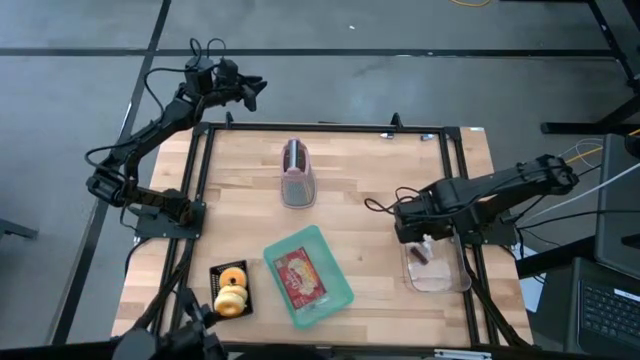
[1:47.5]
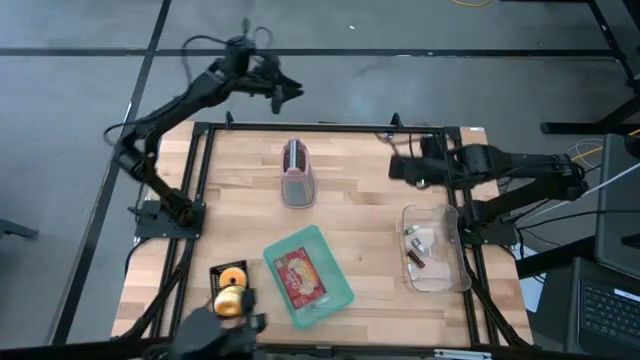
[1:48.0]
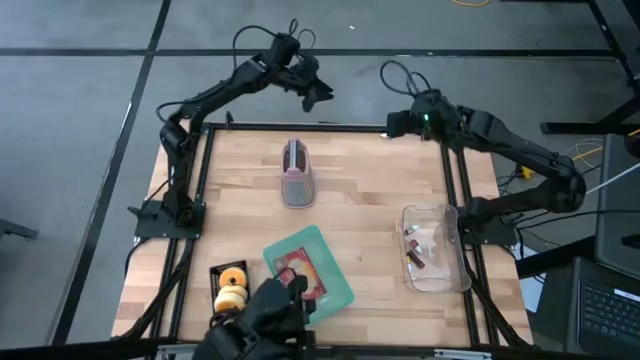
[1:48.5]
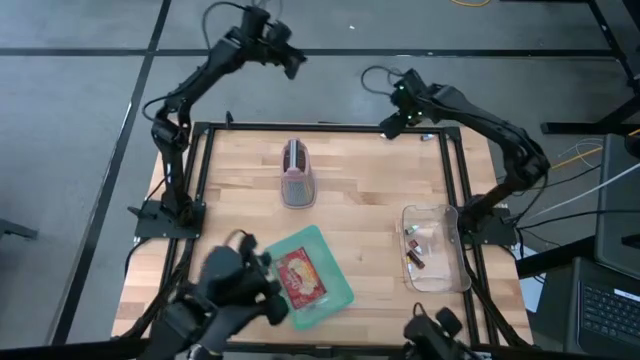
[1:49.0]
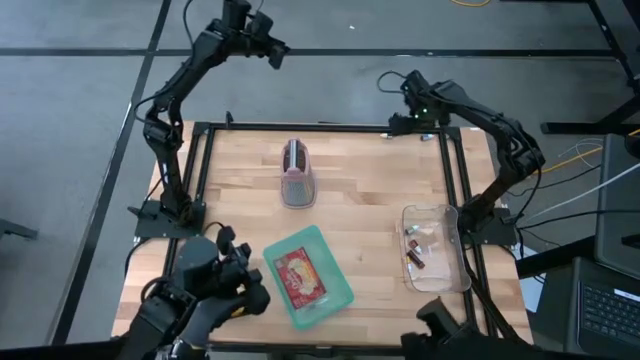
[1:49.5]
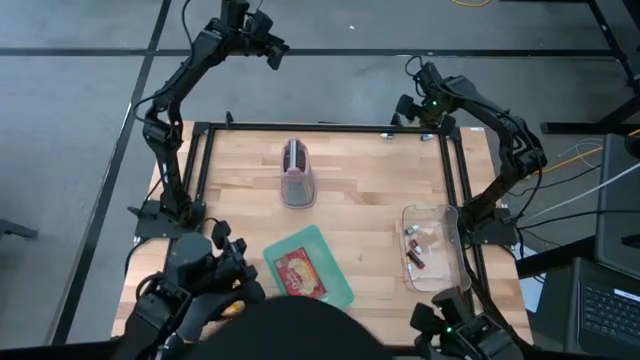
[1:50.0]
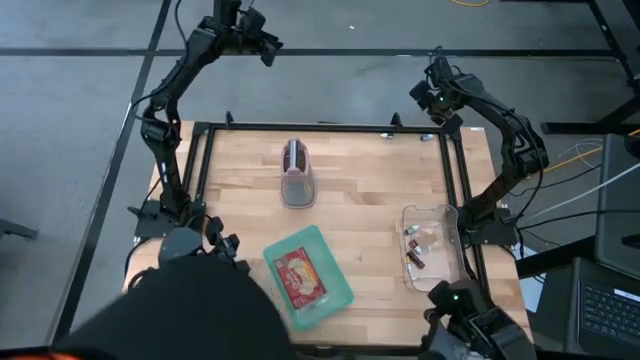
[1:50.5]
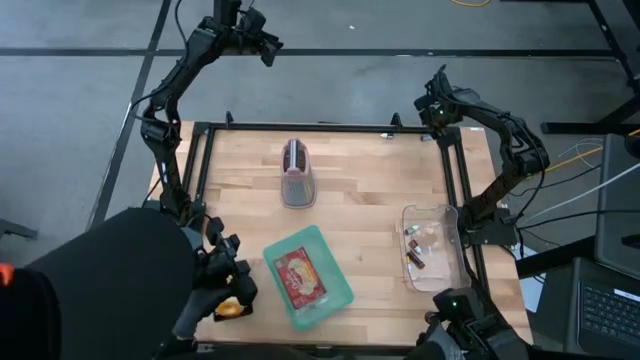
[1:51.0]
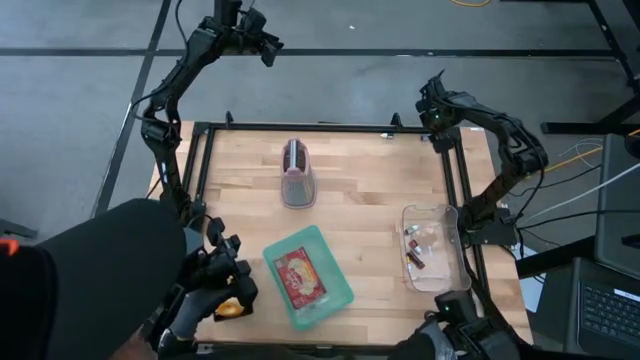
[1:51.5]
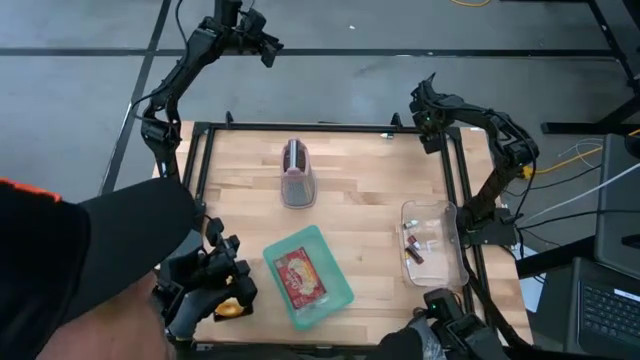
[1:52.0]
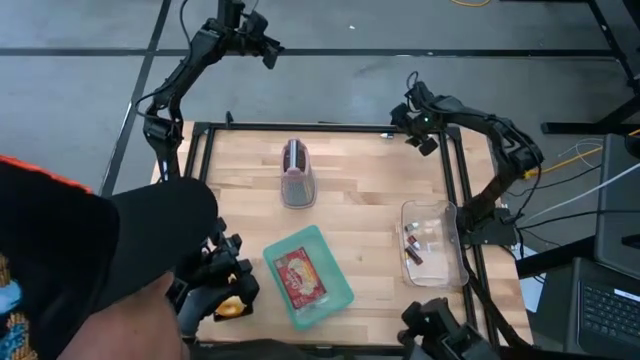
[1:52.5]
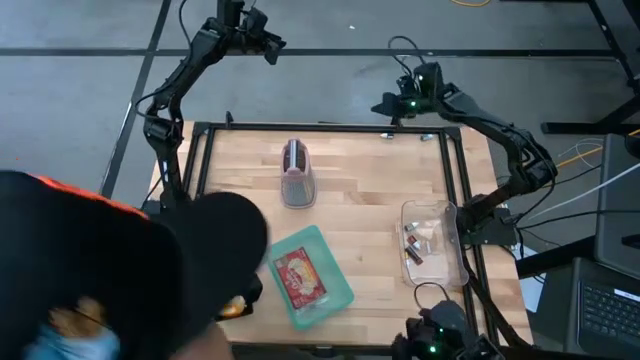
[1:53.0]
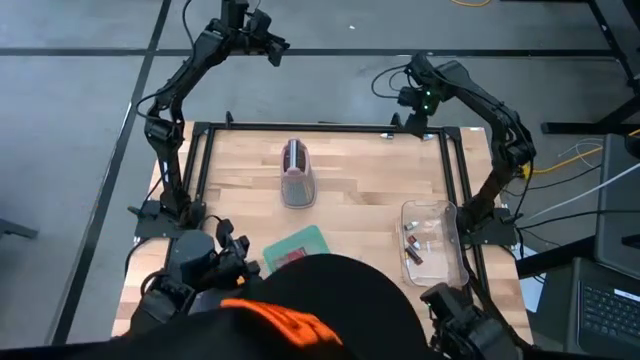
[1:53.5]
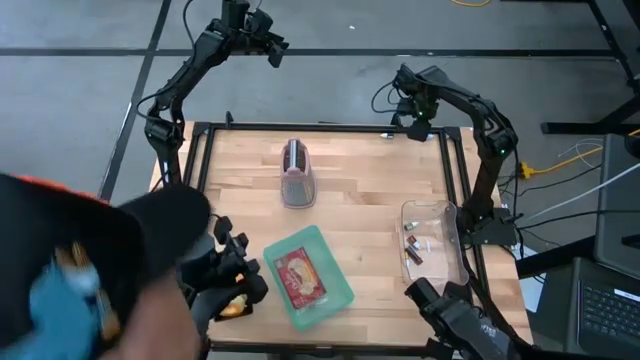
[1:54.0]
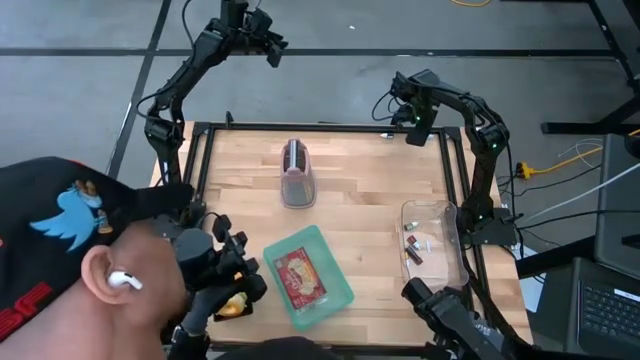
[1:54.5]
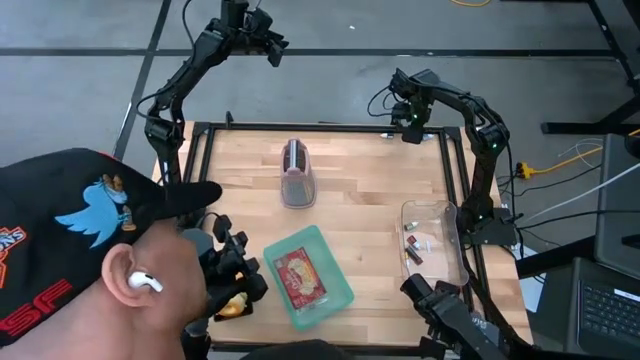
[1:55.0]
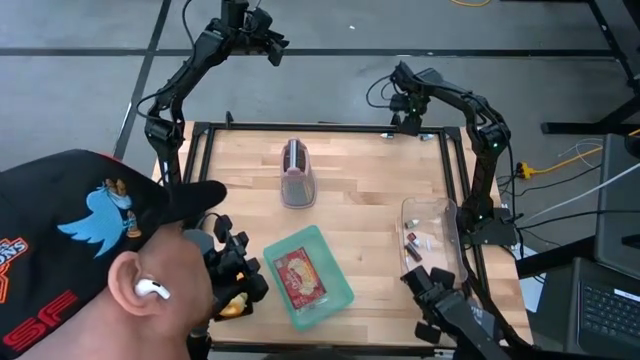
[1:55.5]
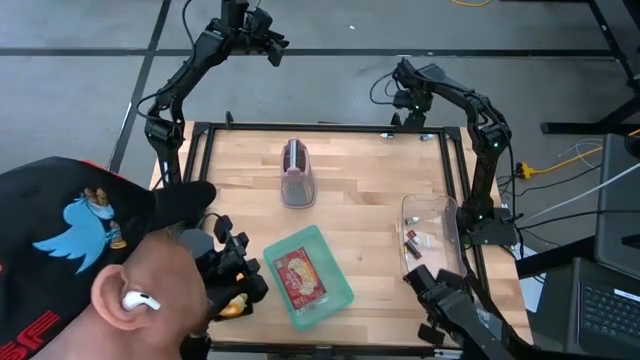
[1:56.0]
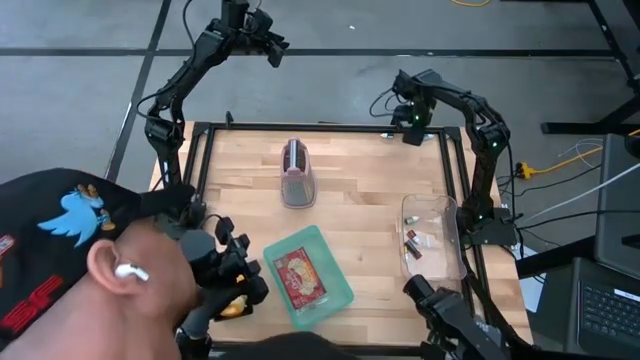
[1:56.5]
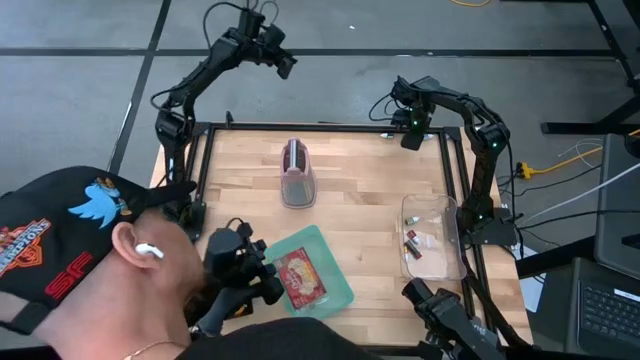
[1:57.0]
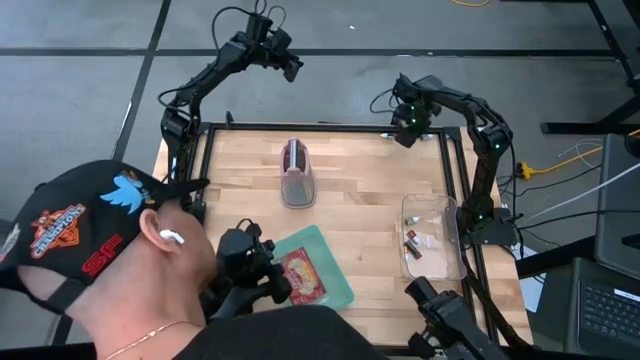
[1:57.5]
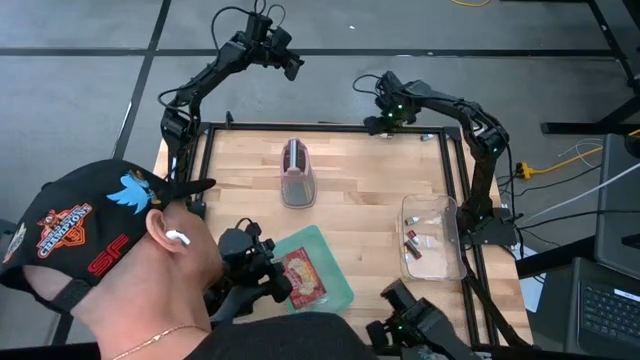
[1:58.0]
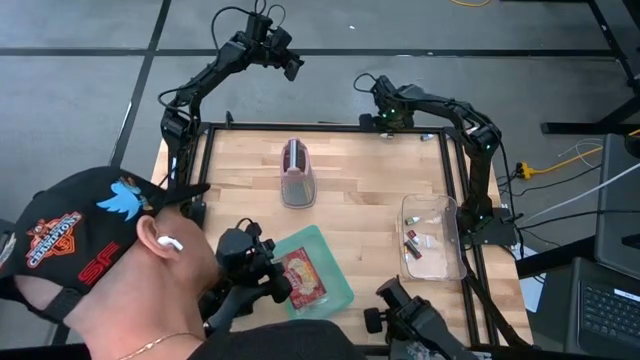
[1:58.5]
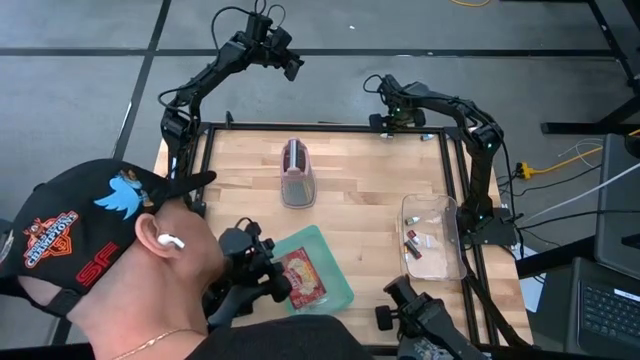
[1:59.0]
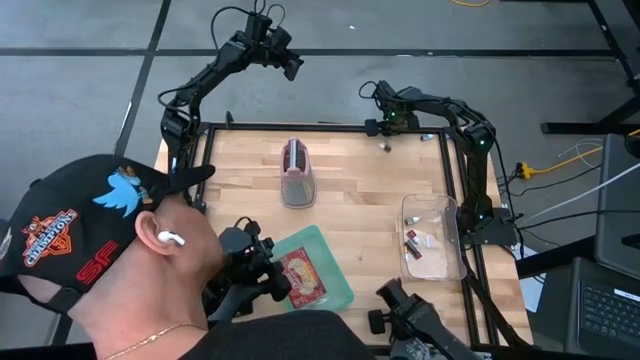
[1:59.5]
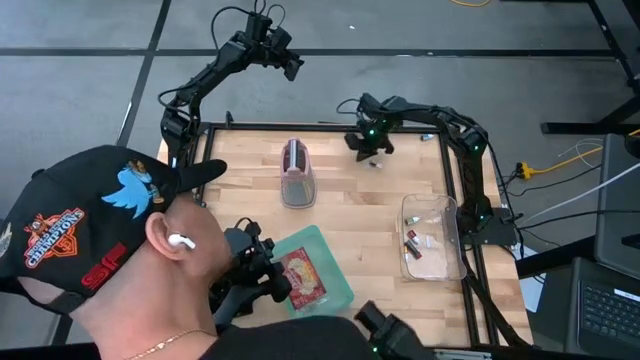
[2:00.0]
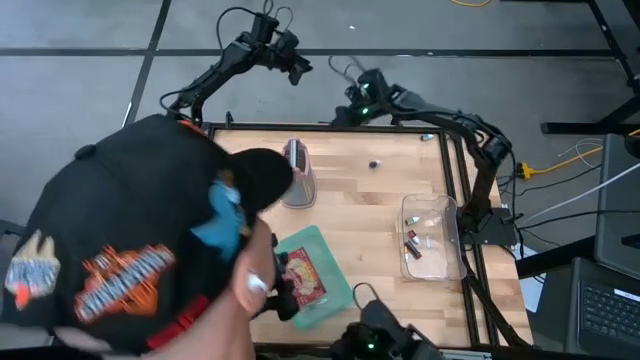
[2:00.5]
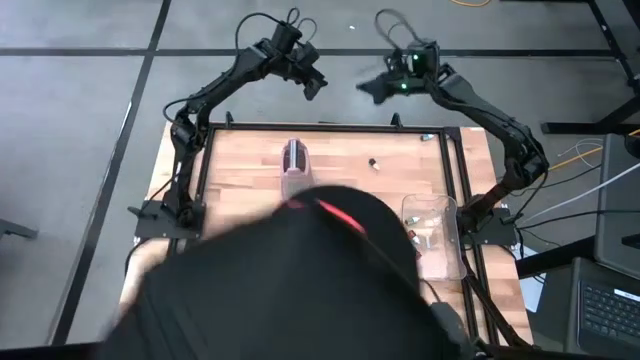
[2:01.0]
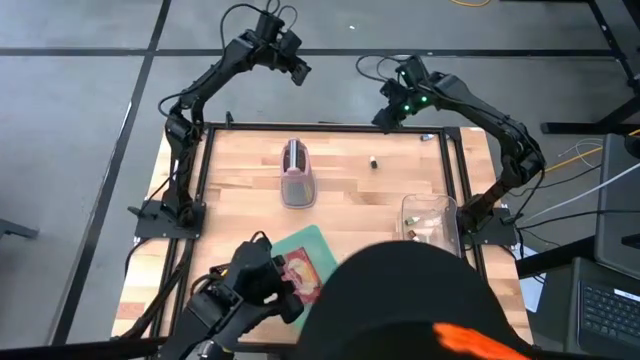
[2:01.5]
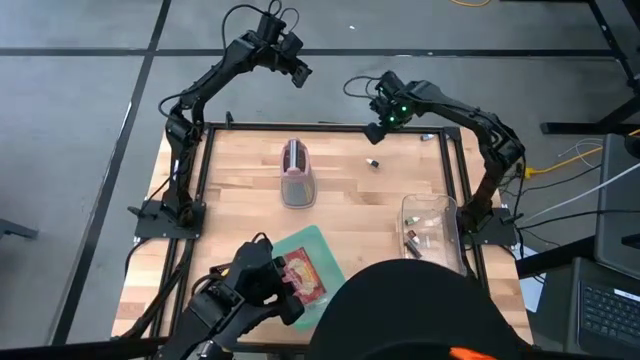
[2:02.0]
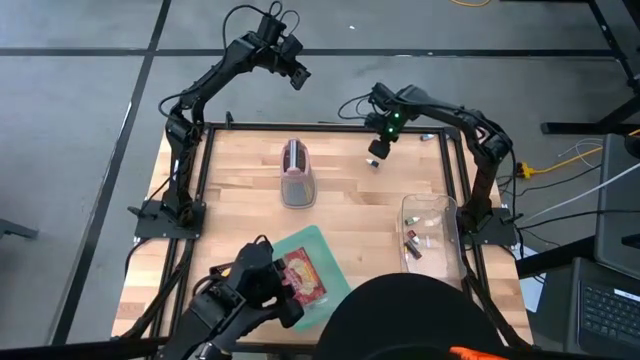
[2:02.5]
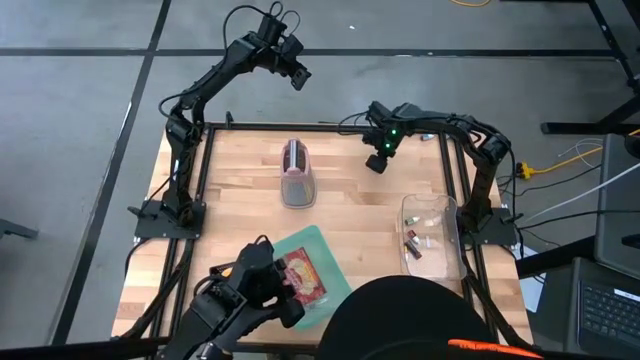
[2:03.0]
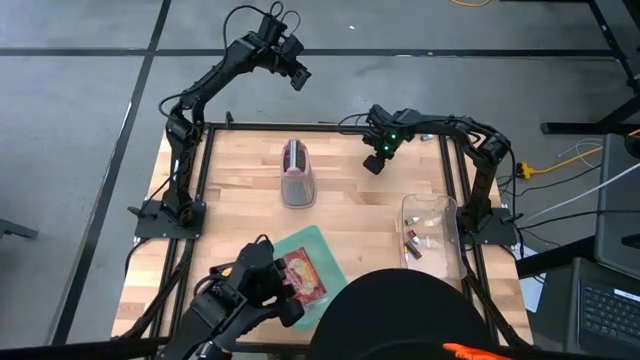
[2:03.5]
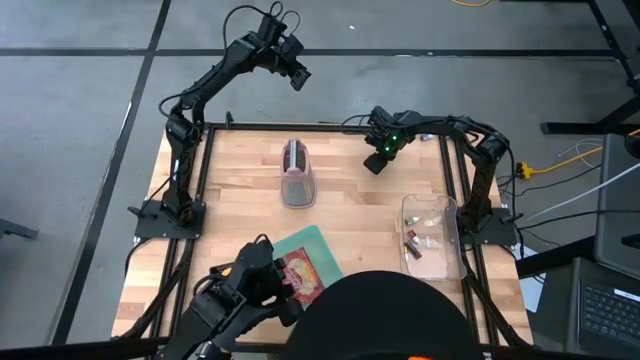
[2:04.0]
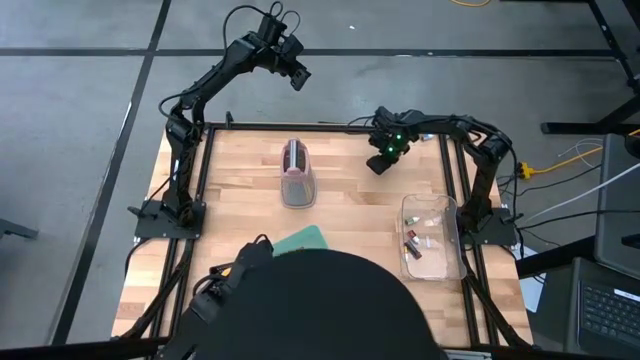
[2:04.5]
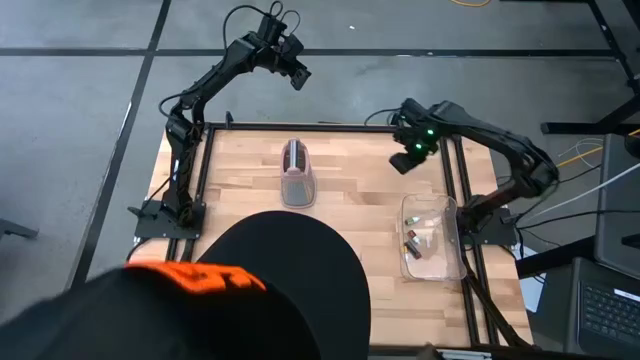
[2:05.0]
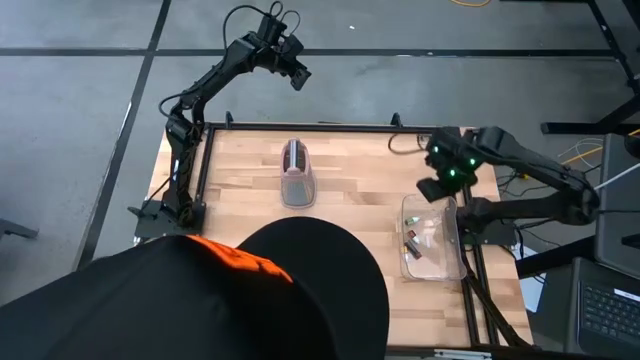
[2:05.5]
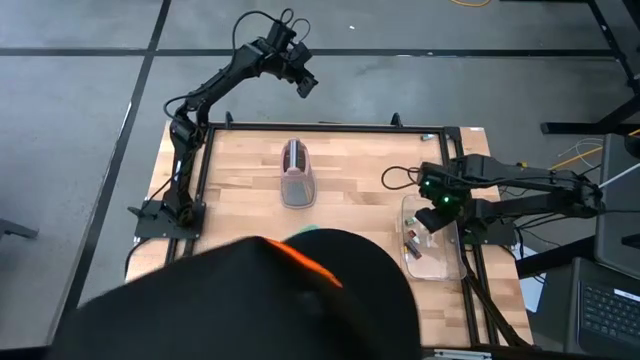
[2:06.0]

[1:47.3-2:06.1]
Task: Pick & Place Food Item
Put the purple food coloring bottle into the transparent bin

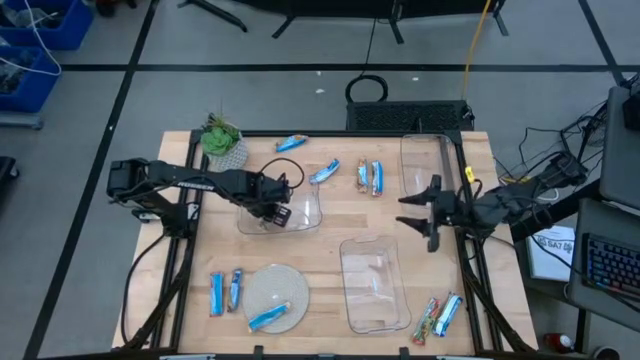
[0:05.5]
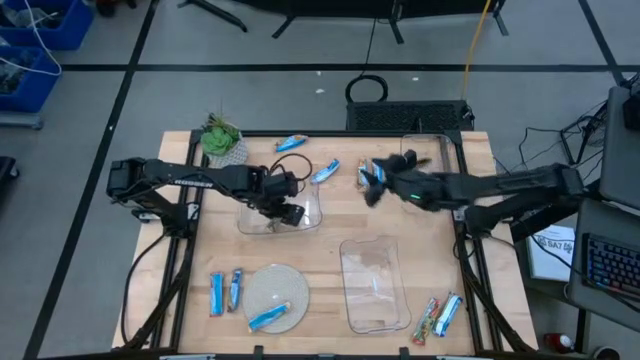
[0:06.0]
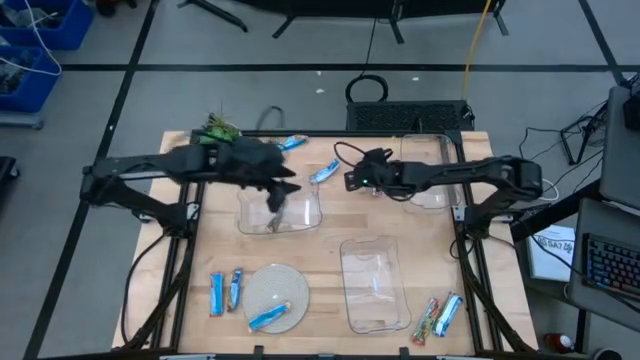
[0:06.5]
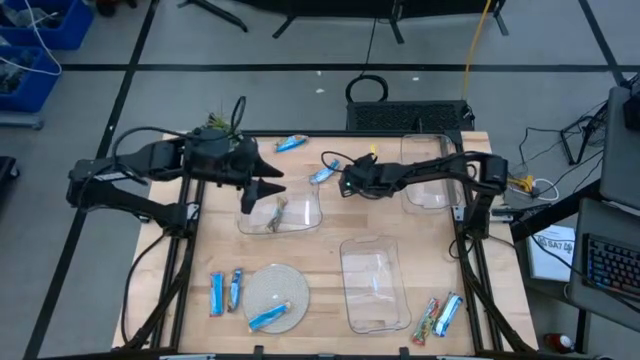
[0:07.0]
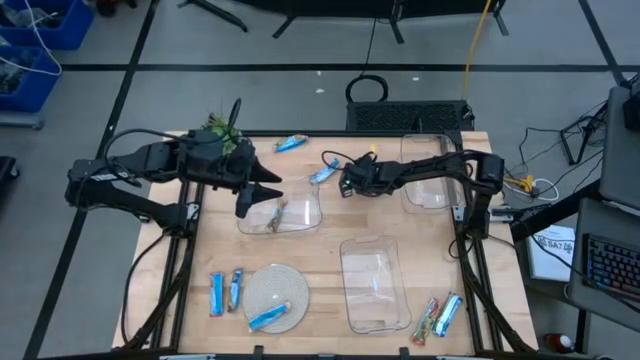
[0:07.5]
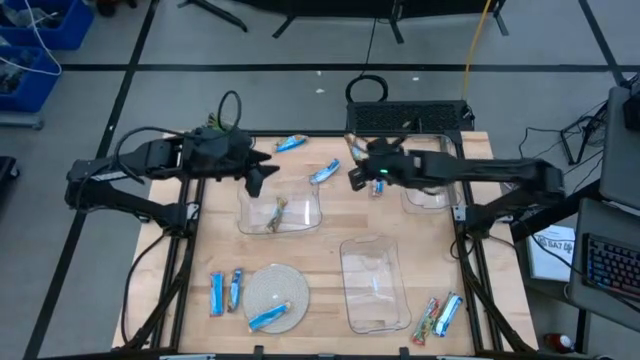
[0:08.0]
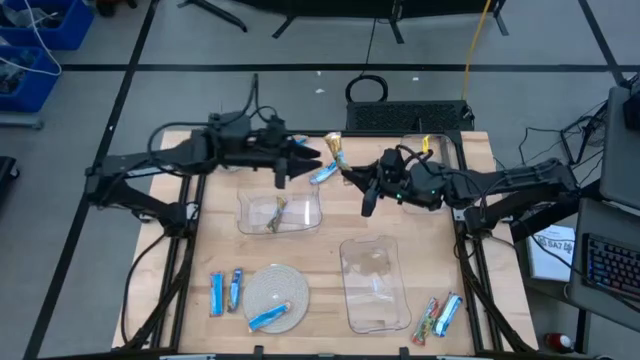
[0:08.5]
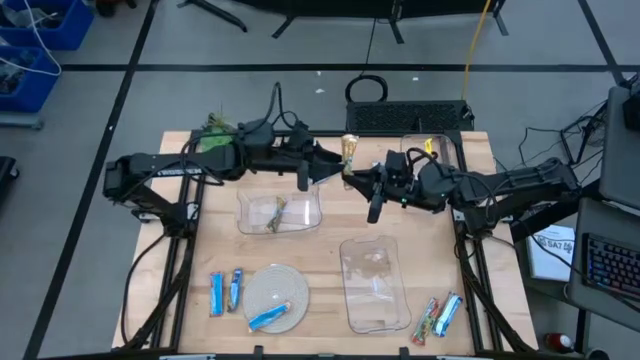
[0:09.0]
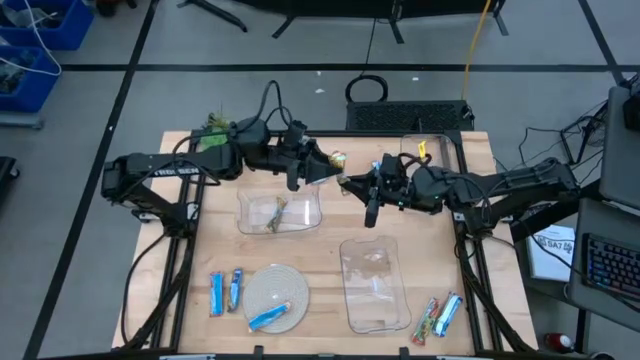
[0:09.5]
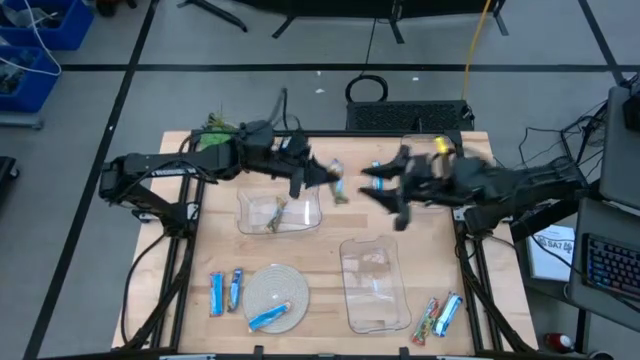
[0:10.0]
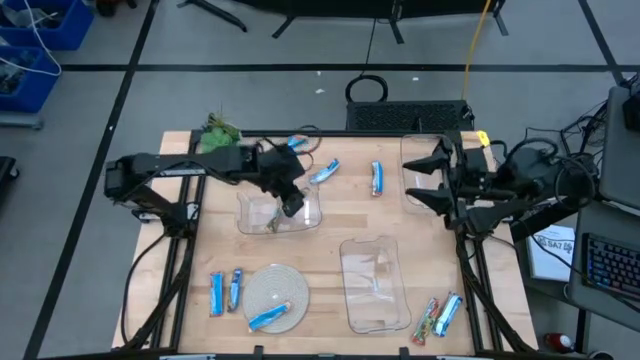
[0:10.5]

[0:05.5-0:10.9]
Task: Pick and place Granola Bars by type
Put the top right yellow granola bar into the top left transparent bin
